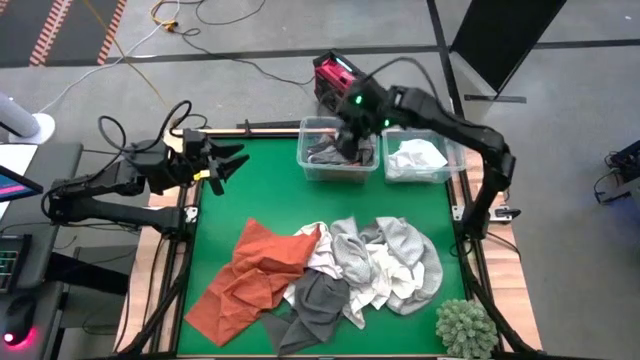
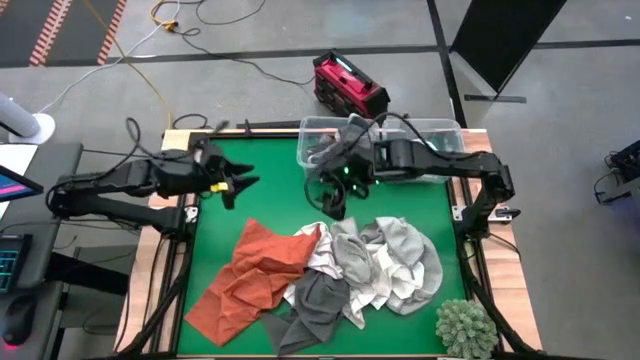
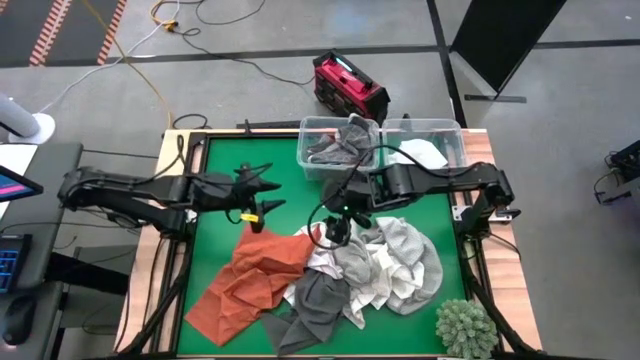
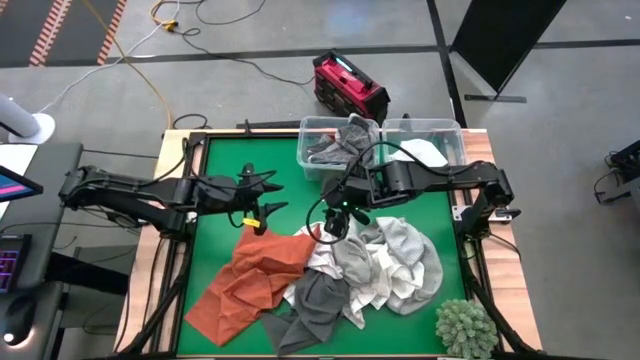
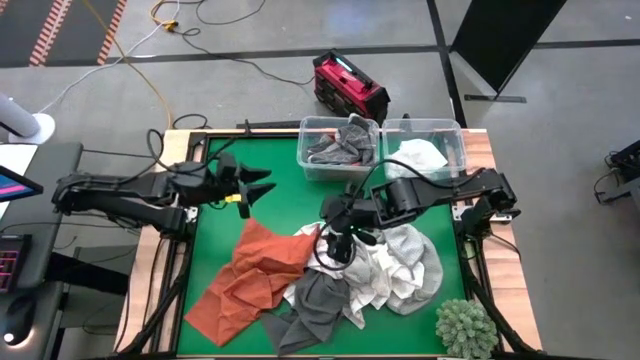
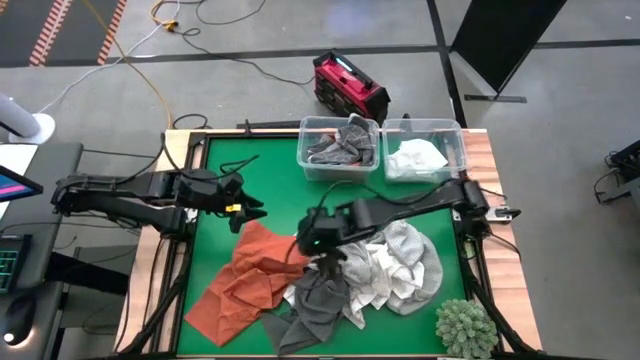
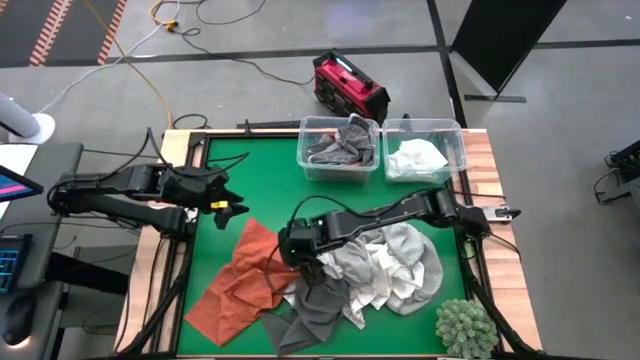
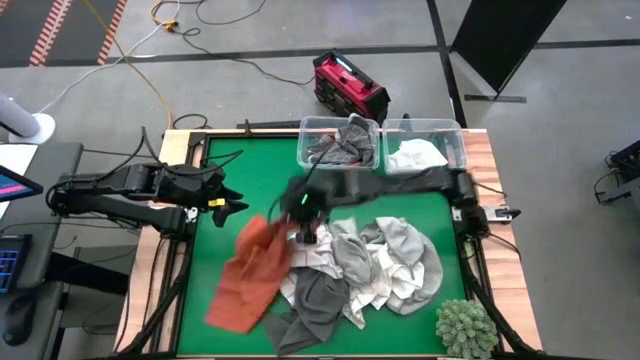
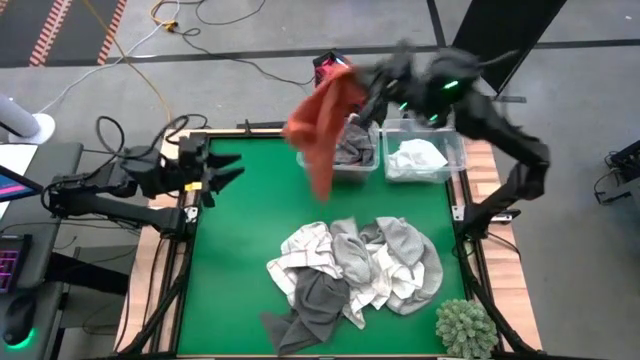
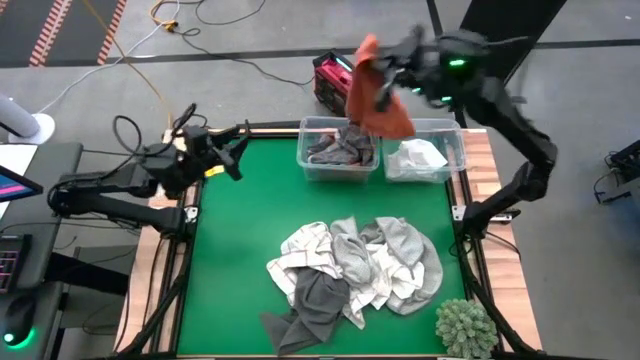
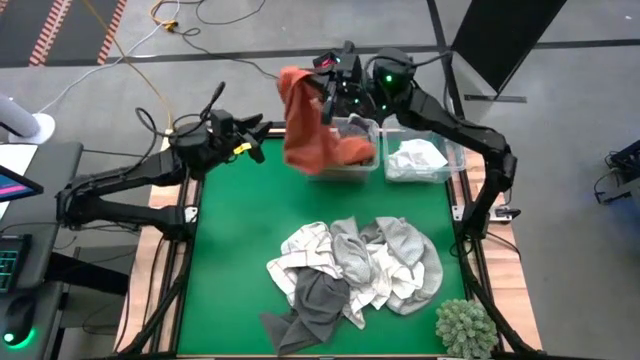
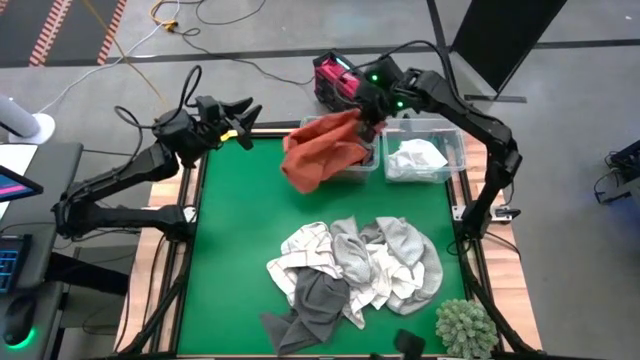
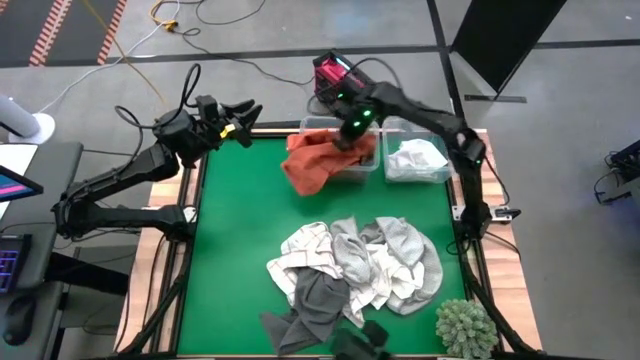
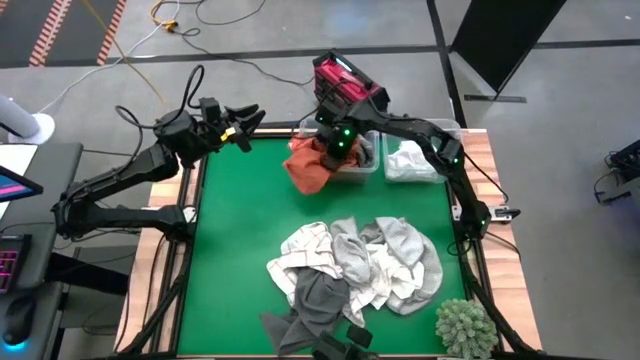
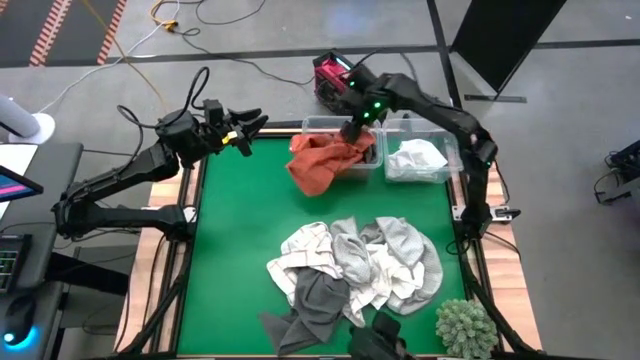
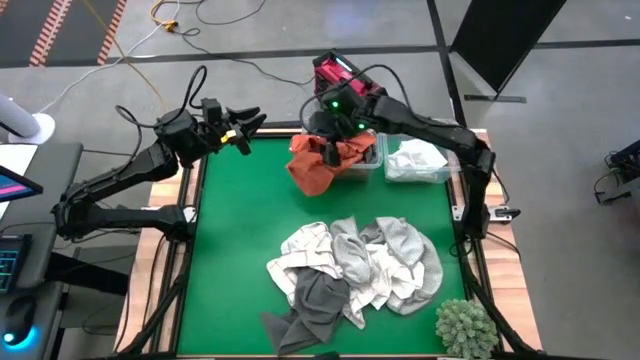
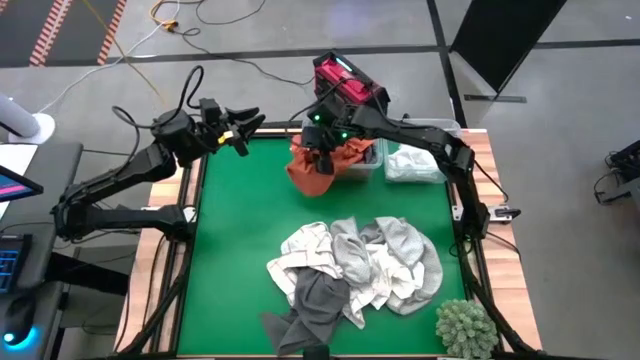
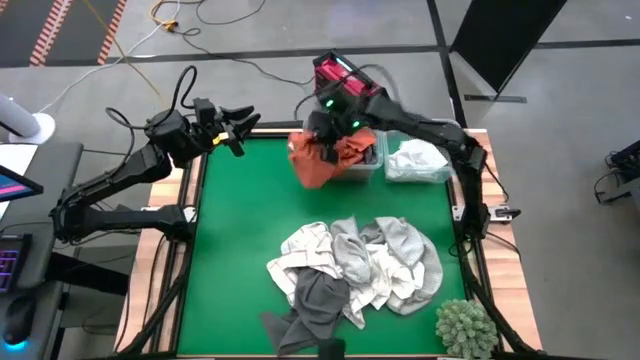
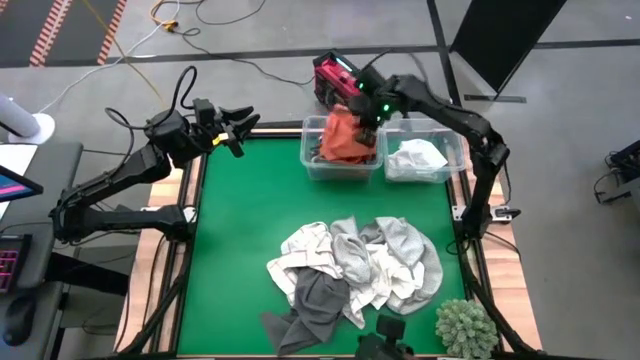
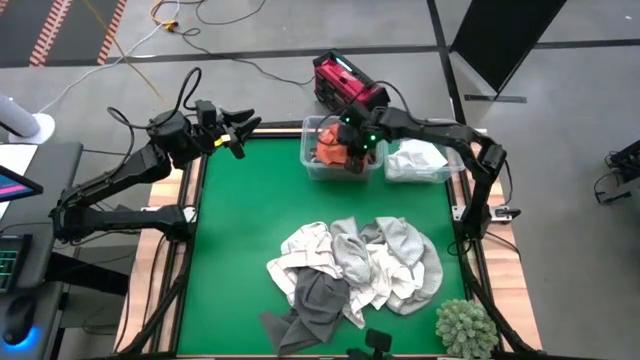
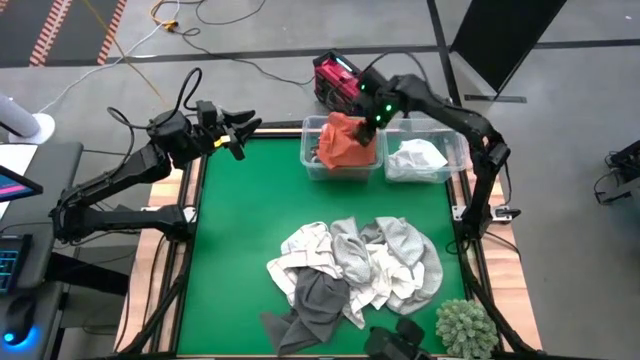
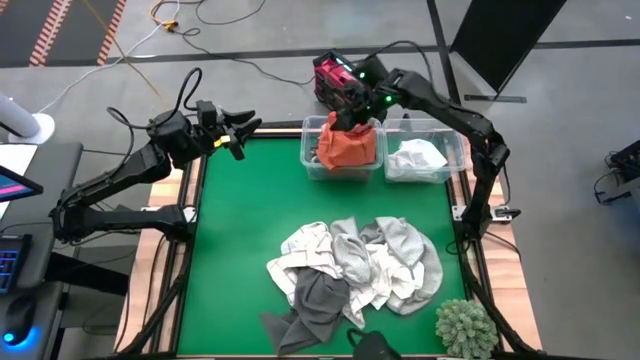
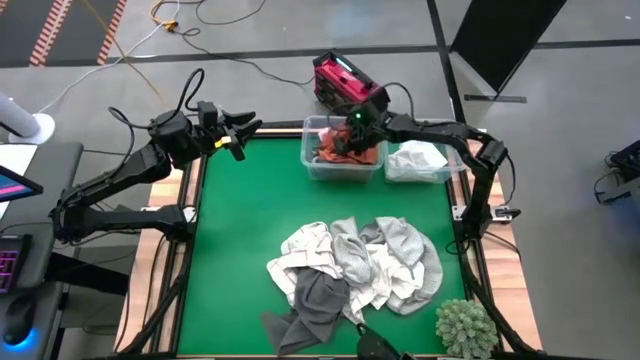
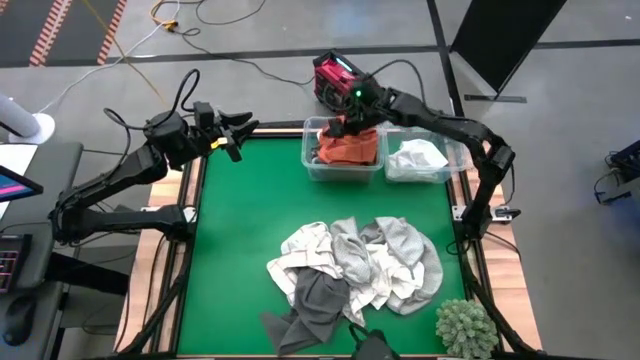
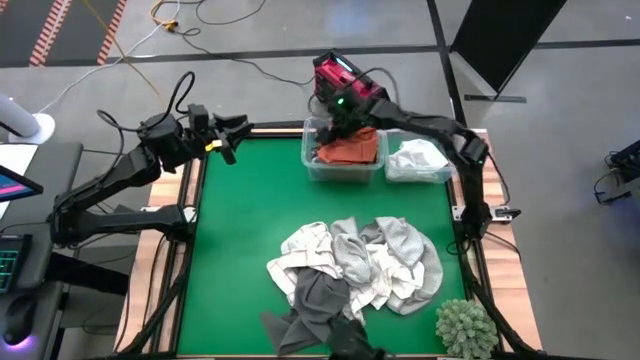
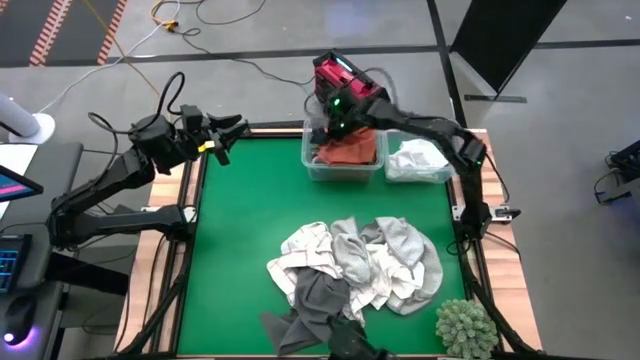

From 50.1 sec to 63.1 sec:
Task: Sort towels by color in basket
Put the orange towel into the left transparent bin

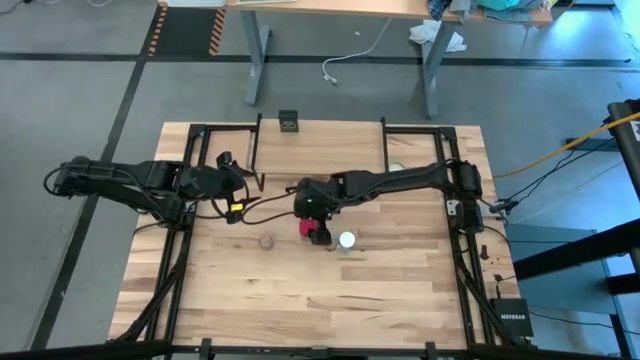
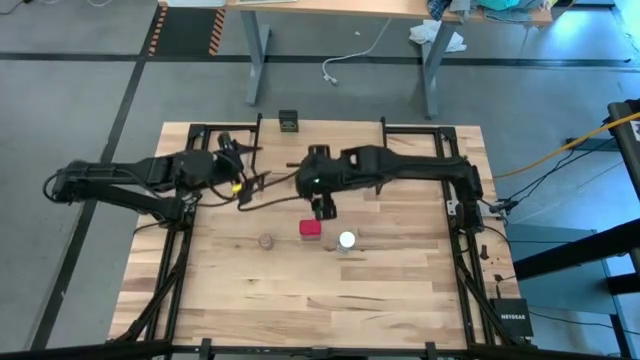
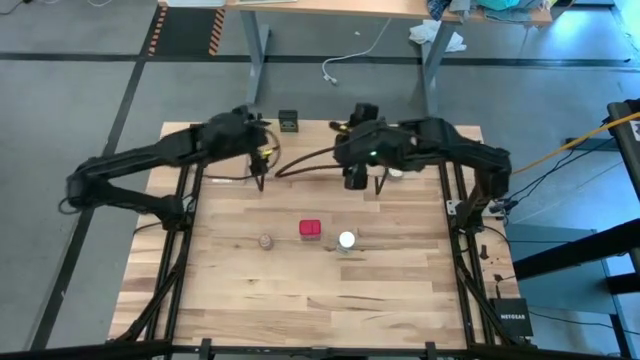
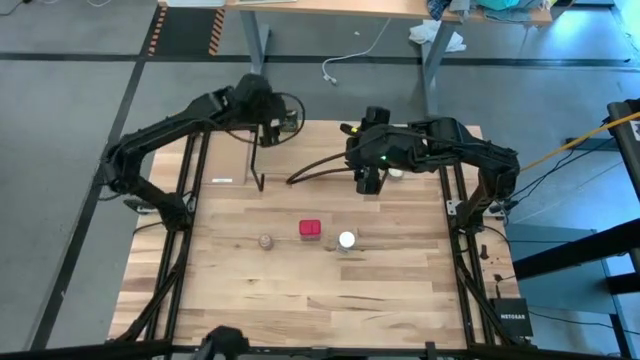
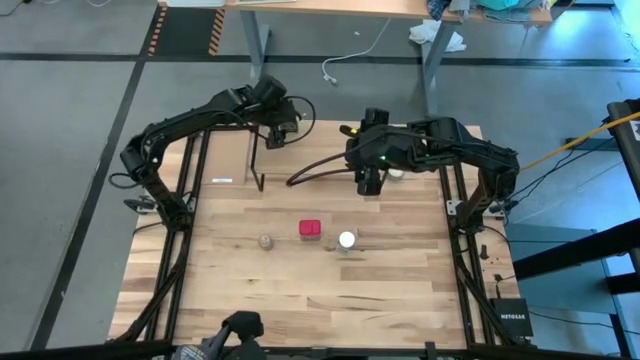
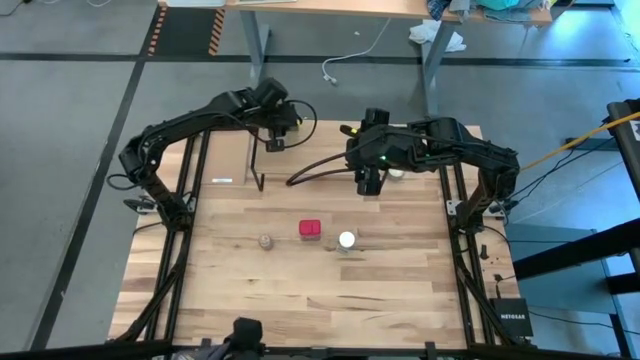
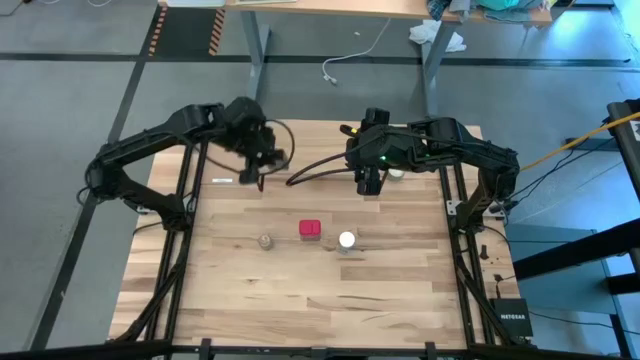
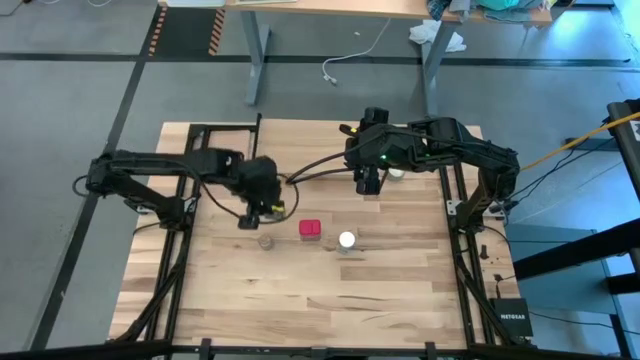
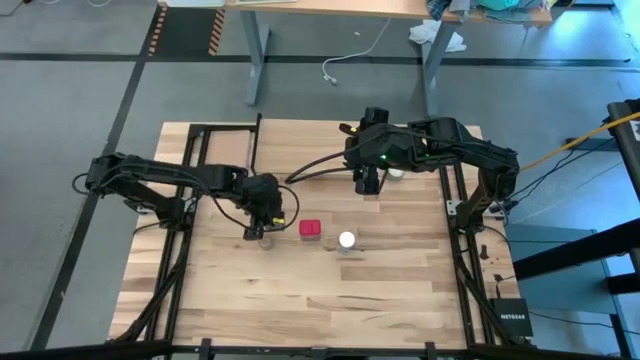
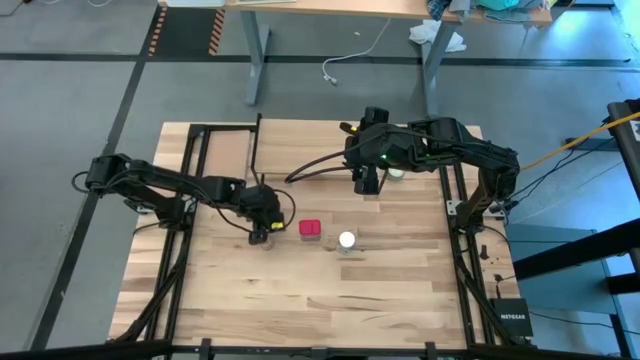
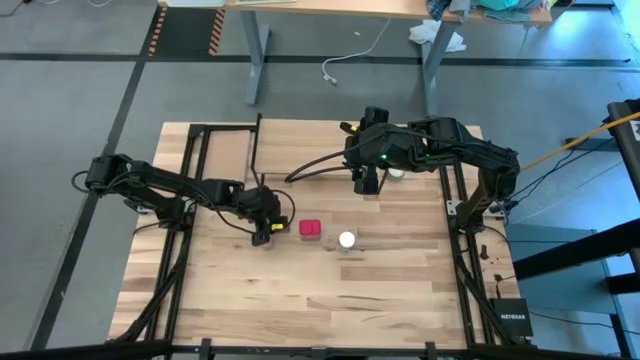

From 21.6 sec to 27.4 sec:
Task: Shelf spices
Remove the black seasoning can from the shelf
